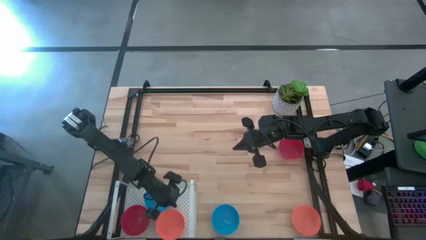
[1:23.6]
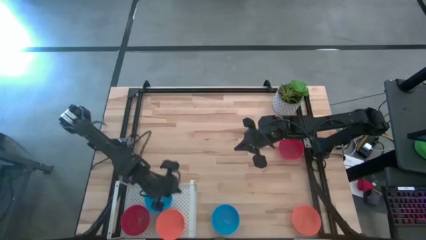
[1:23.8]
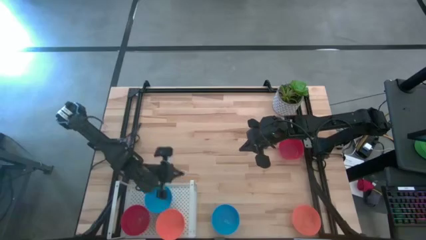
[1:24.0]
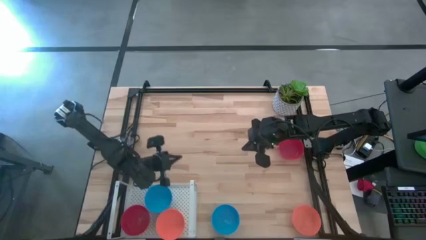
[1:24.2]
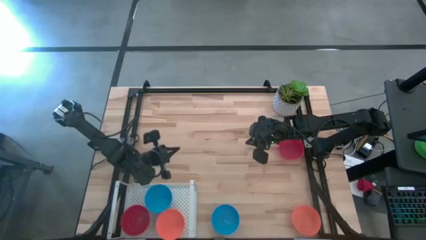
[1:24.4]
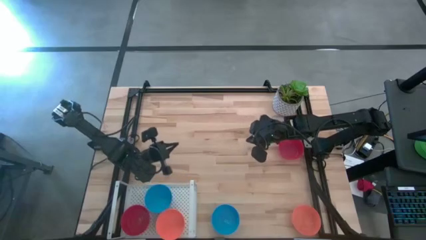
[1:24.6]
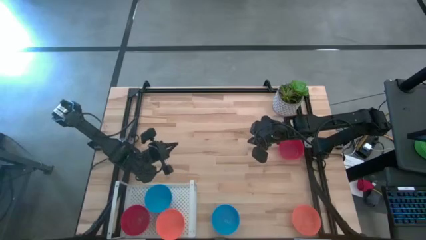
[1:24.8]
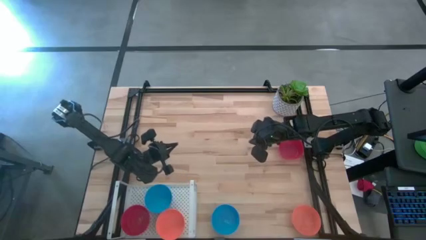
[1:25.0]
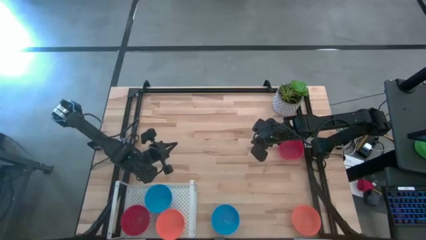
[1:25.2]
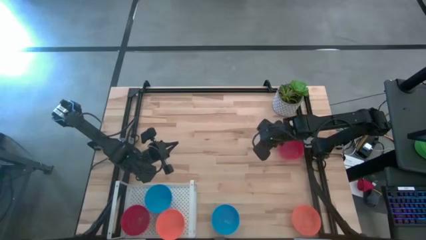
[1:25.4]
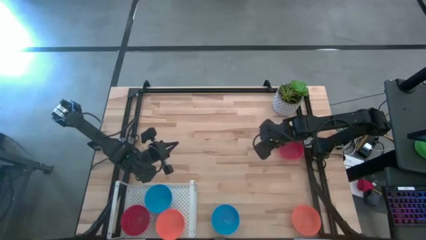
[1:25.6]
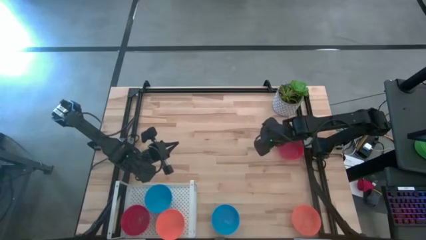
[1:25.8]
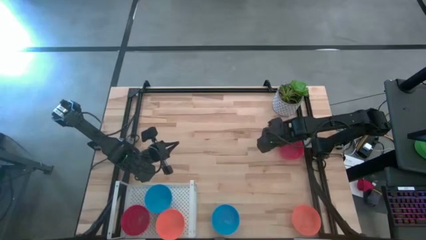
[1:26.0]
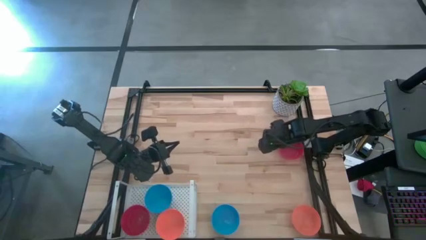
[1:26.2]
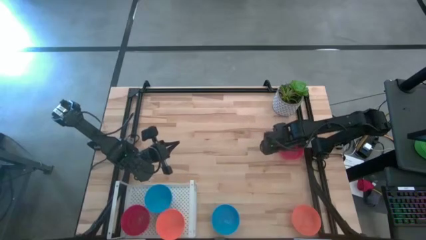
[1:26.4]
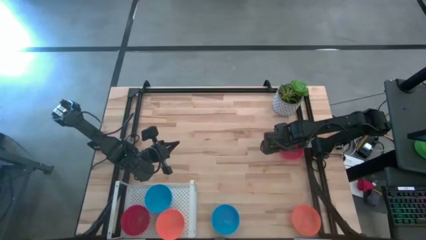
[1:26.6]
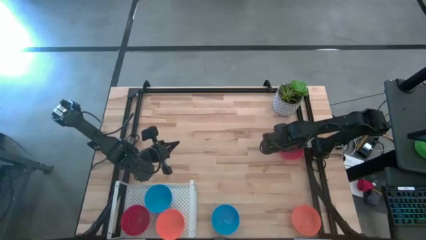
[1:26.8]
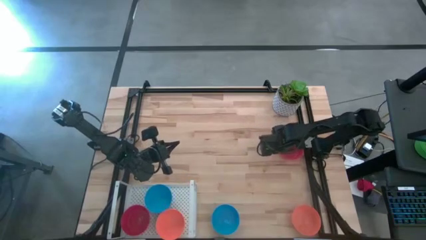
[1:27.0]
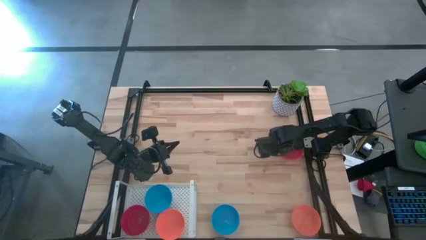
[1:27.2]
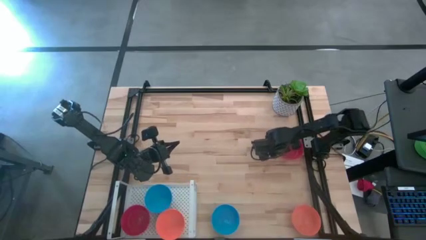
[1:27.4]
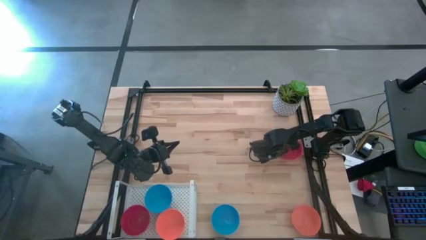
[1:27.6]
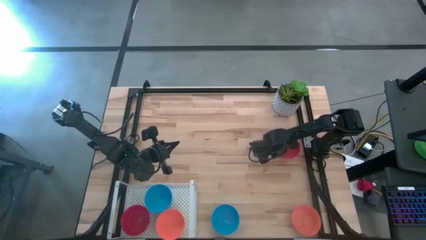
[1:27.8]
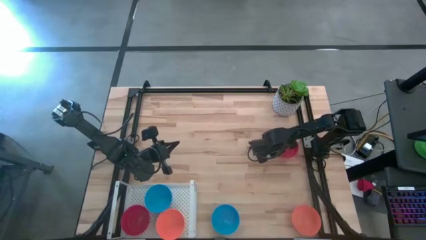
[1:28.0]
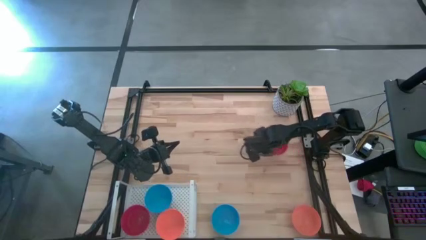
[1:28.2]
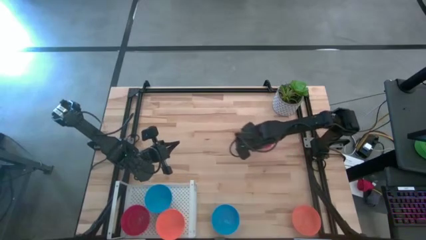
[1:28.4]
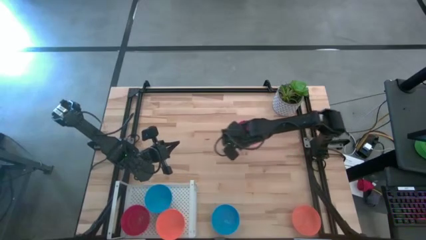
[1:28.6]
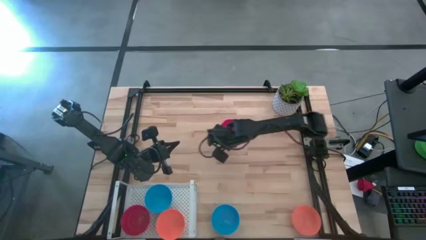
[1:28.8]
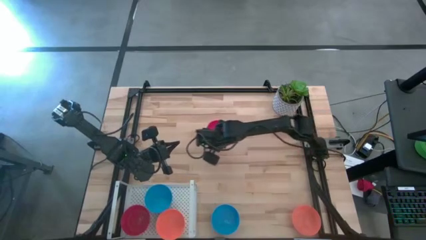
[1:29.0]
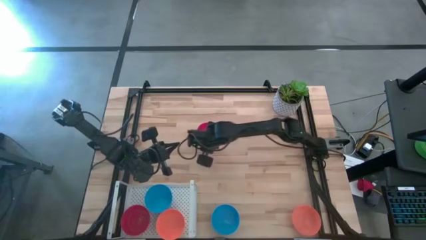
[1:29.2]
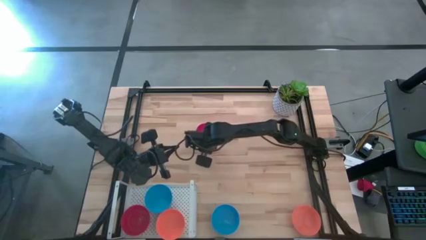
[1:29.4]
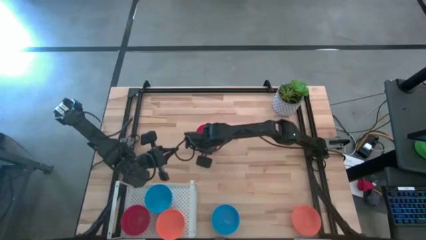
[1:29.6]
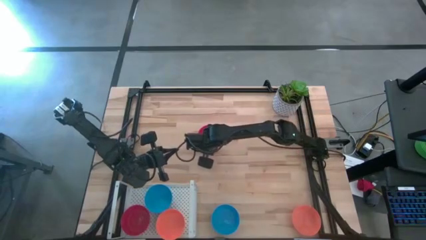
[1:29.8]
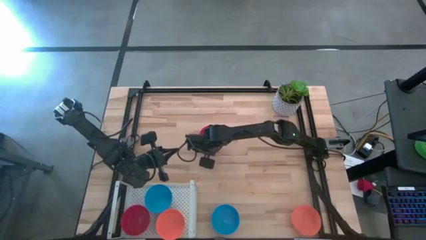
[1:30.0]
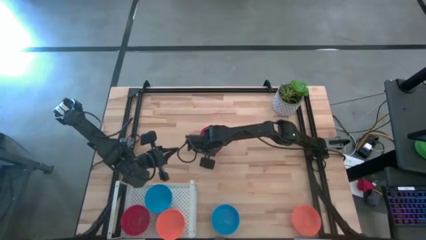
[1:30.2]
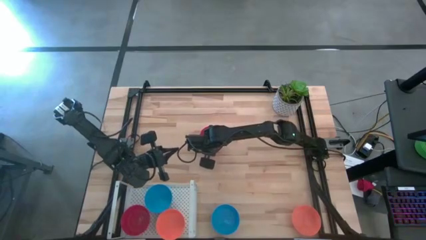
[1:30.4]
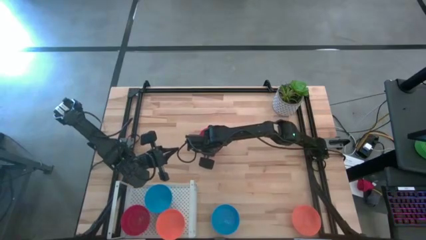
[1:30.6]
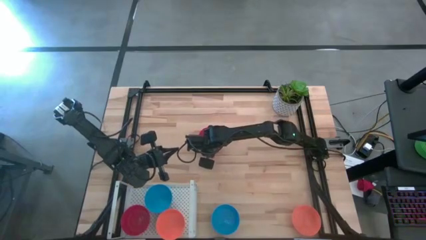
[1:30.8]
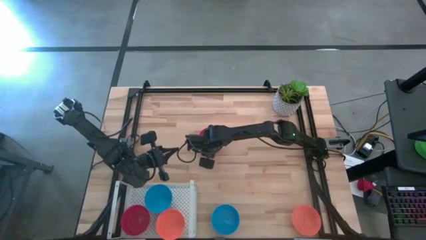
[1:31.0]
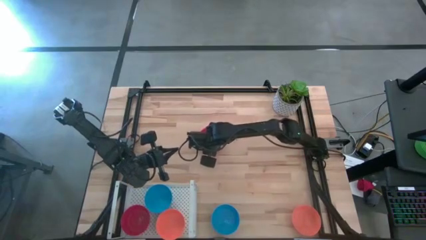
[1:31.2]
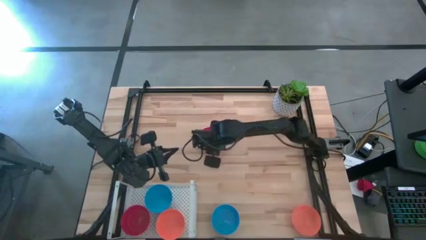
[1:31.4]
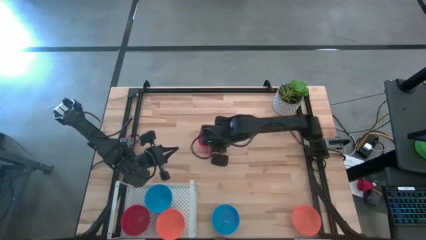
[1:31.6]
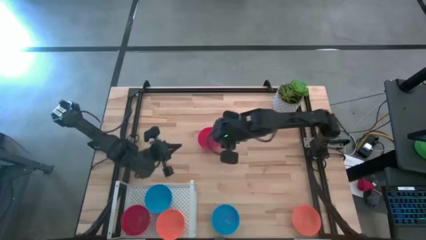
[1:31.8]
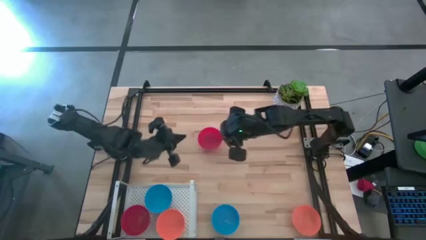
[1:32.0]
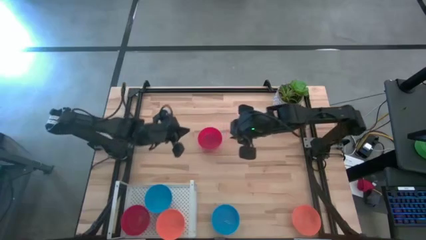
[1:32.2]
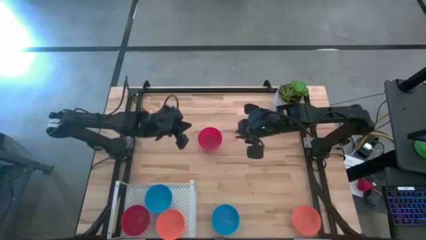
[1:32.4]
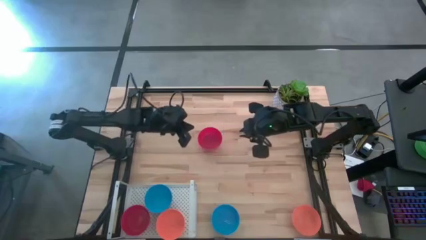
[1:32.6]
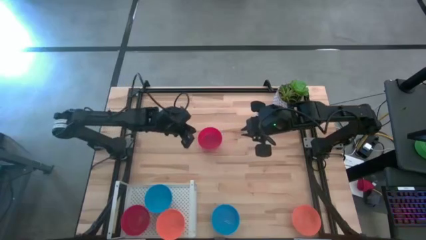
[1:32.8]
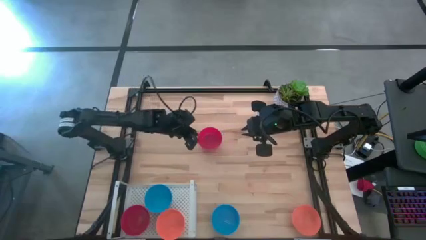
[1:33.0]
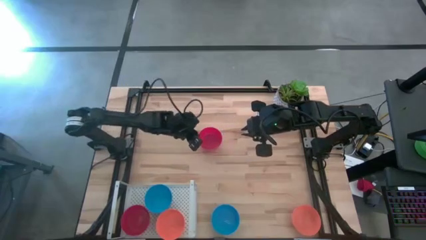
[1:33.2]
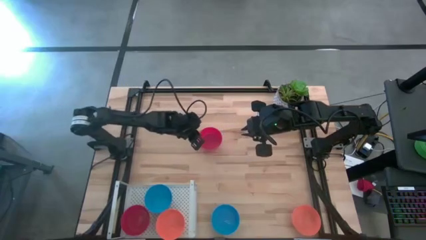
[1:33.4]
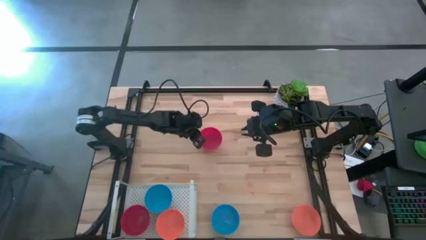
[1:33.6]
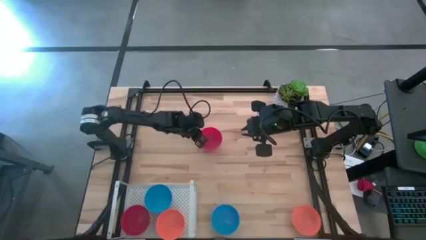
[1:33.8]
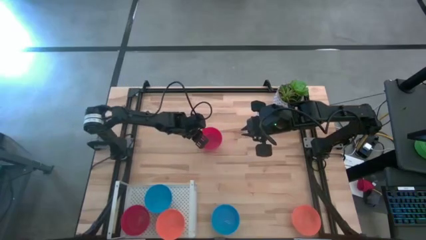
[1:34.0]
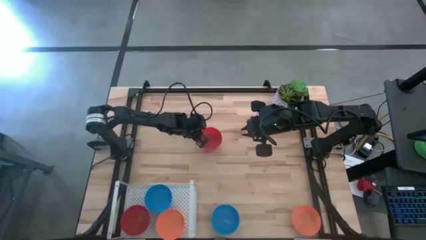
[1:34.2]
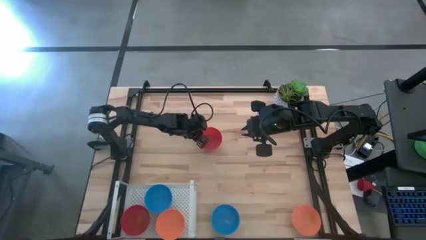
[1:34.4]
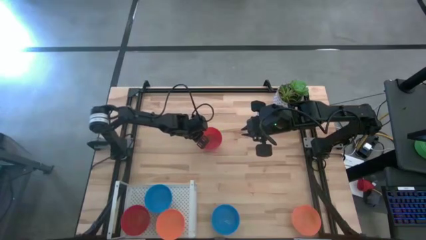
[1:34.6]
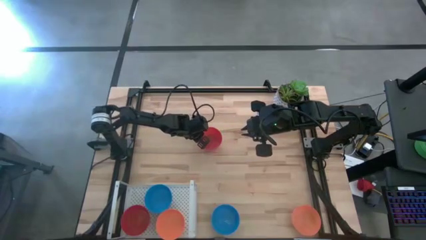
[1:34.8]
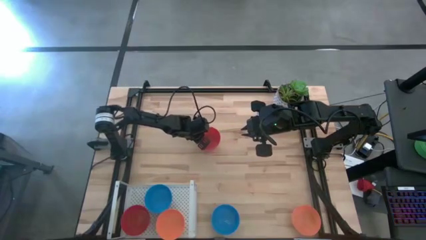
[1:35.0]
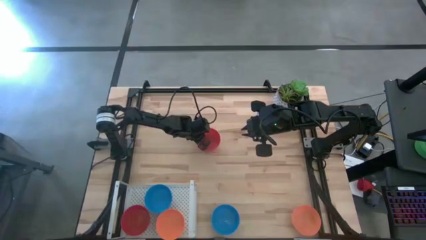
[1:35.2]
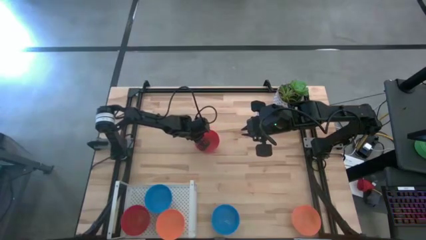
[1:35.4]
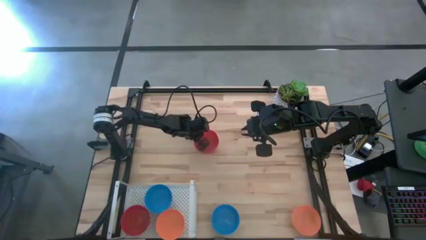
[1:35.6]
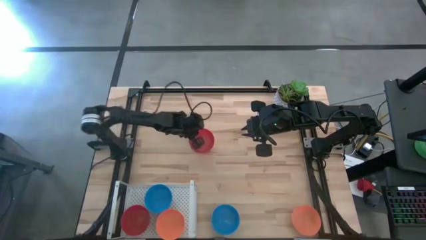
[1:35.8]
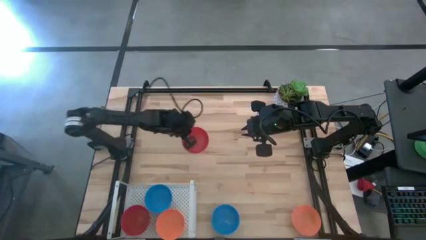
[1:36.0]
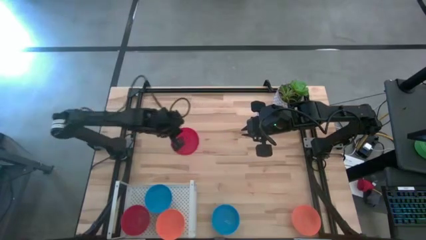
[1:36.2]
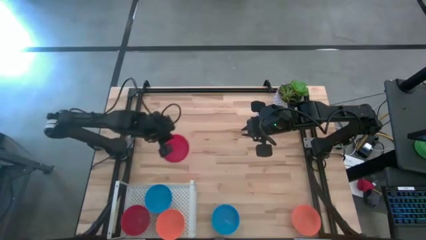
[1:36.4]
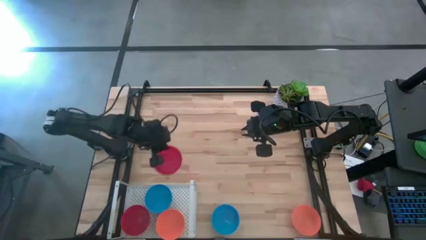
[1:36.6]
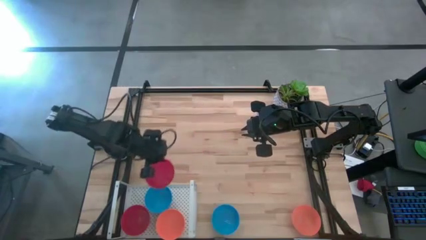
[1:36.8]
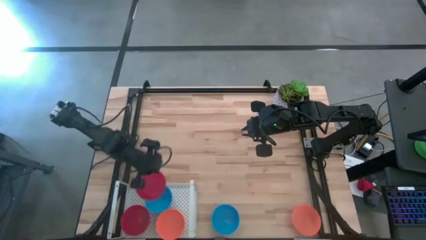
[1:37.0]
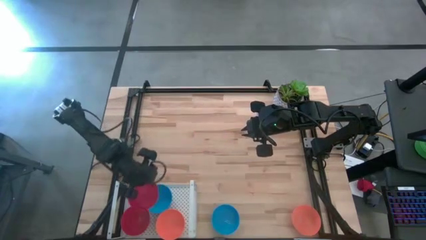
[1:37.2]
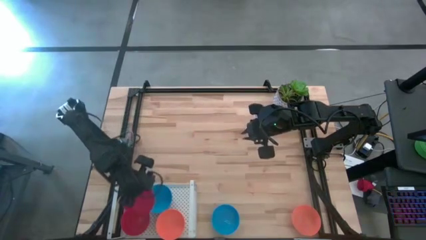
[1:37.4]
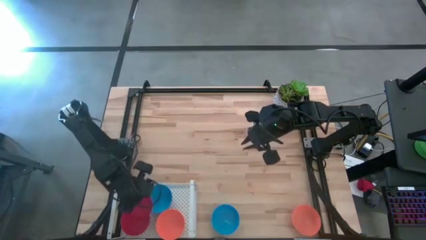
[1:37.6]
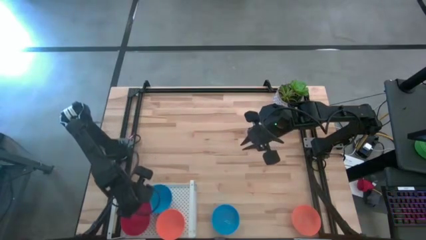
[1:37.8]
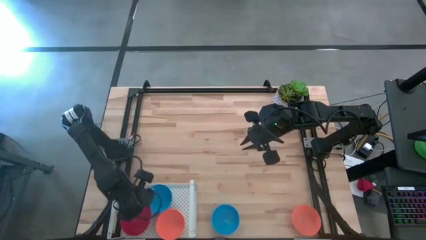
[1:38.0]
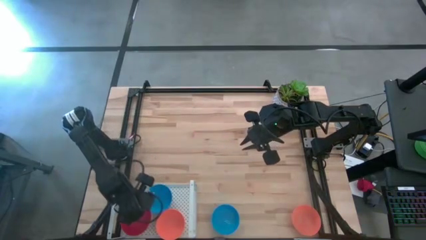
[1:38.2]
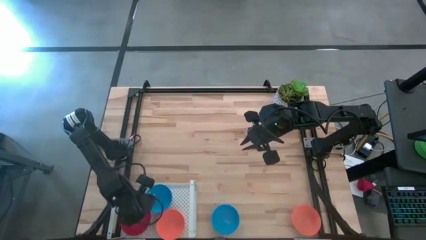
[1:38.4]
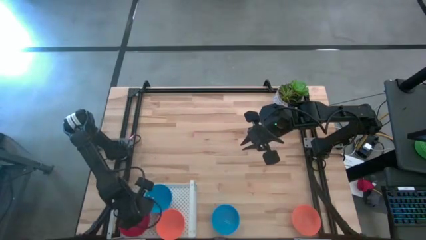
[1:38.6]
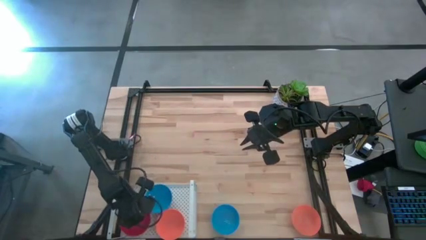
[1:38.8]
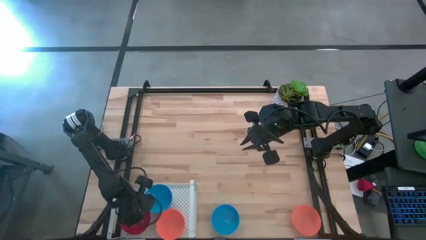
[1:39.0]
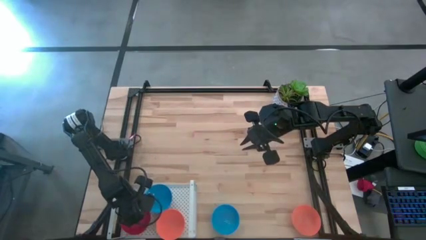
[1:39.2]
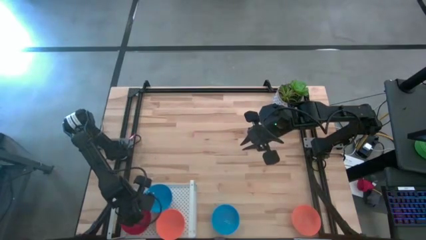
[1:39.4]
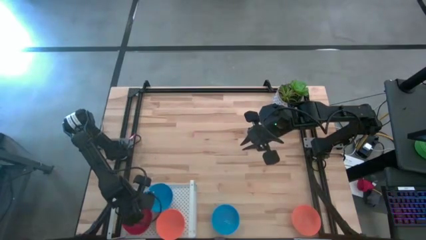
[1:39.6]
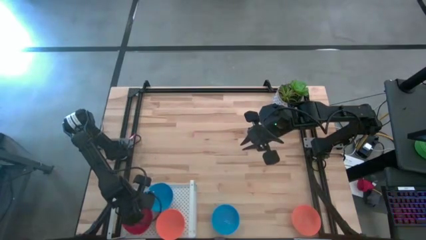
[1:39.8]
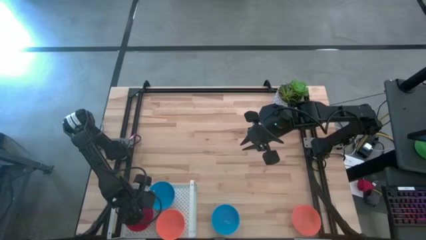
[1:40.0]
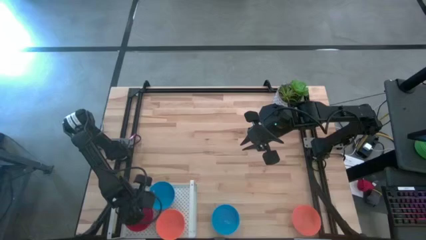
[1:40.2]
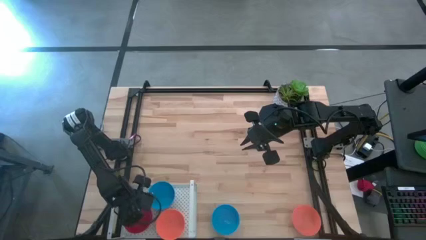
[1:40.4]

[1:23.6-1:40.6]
Task: Pick & Place Mini bowls
Stack the red bowl on top of the red bowl on the shelf
